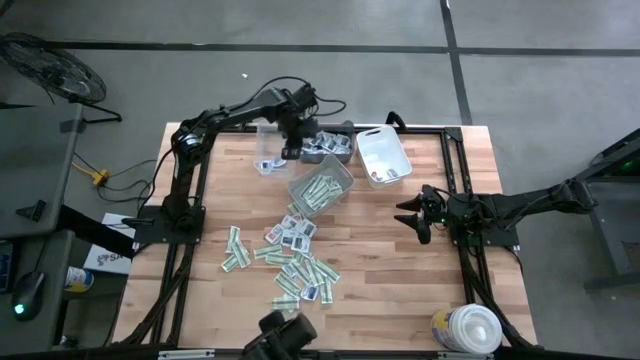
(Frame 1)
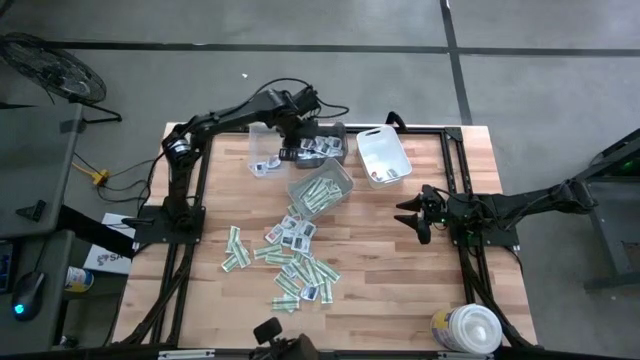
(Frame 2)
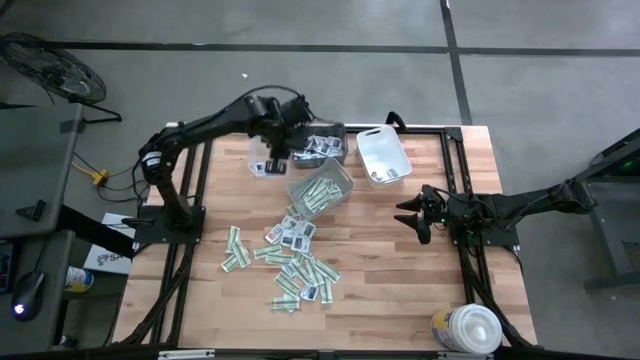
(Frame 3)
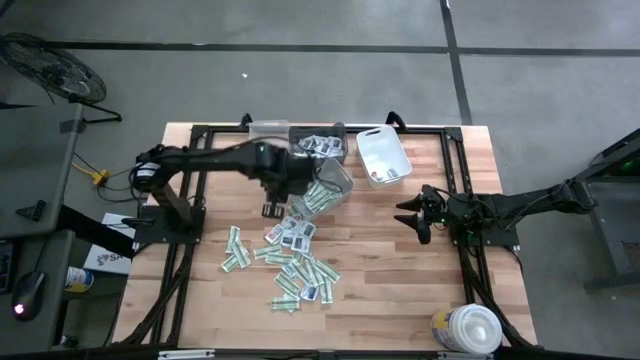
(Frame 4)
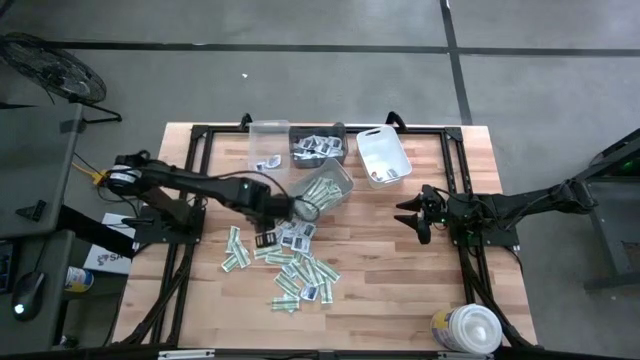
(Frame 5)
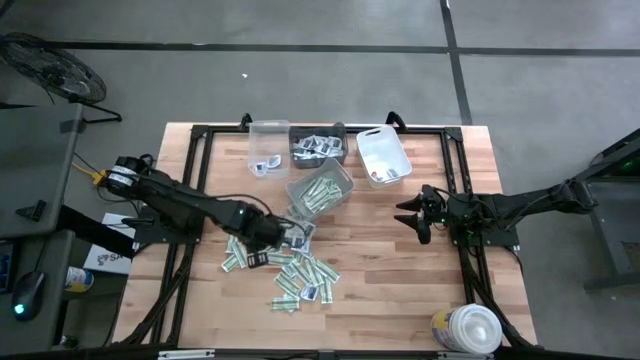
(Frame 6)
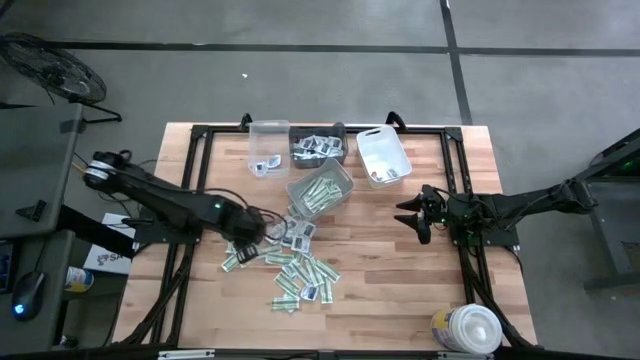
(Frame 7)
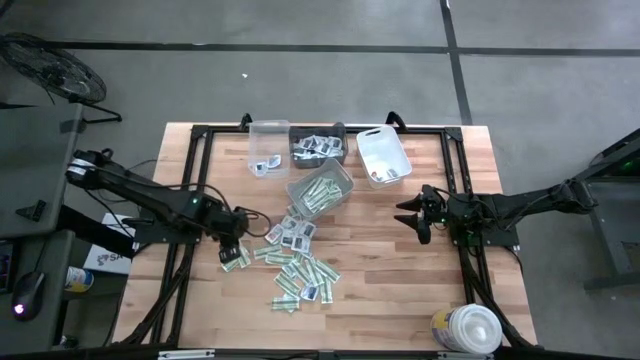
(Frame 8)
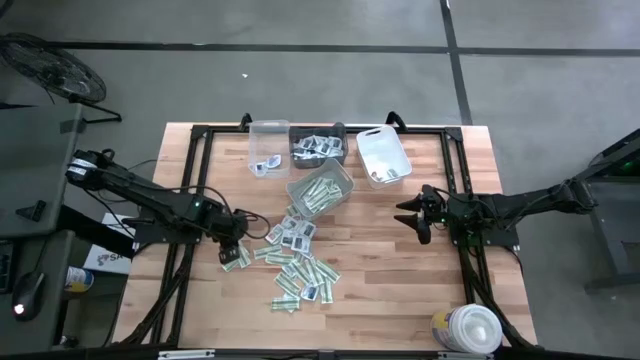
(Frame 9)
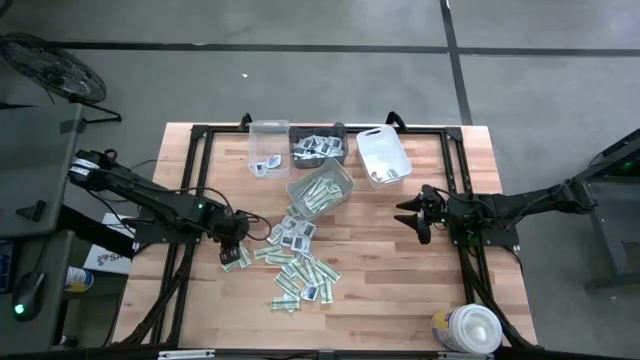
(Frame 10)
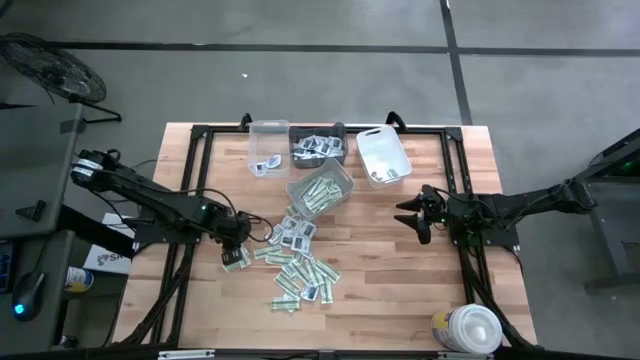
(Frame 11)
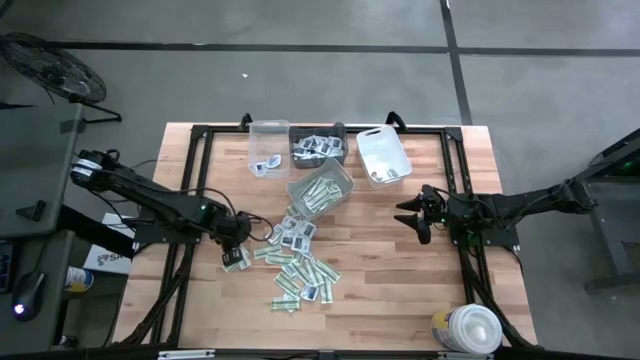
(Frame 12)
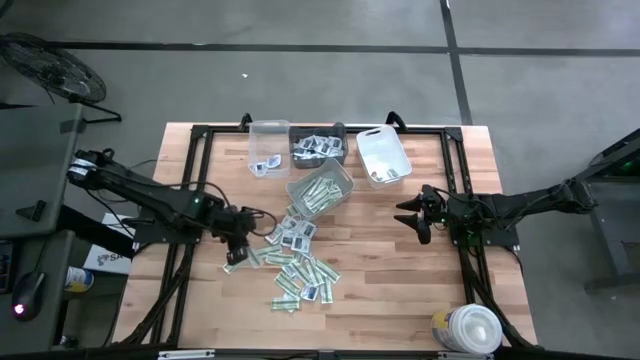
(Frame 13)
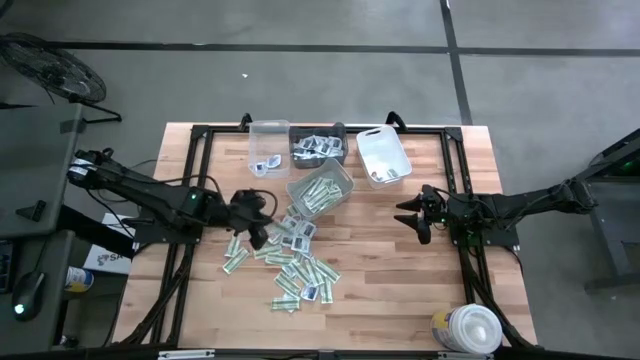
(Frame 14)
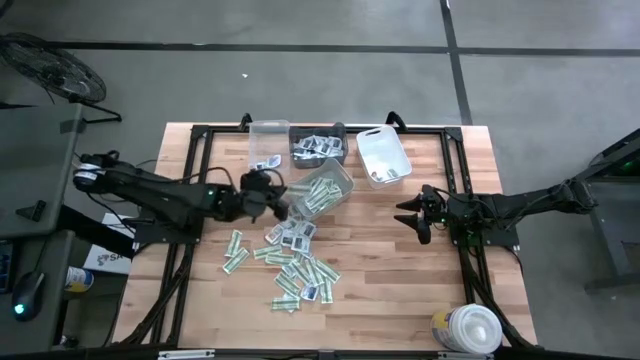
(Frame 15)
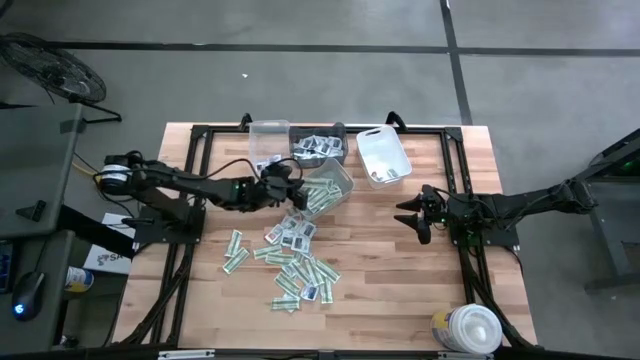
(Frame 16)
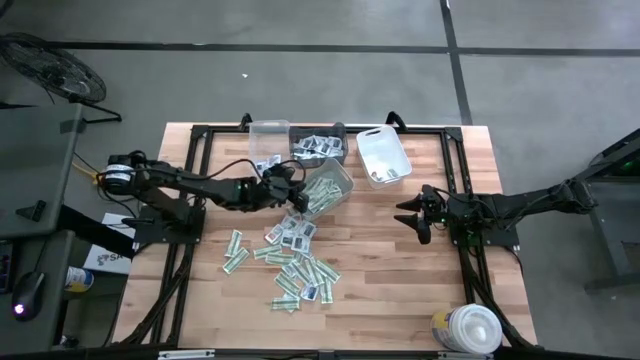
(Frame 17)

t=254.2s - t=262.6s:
Task: Pick & Place First Aid Supplies
Put the bandage pack into the gray bin

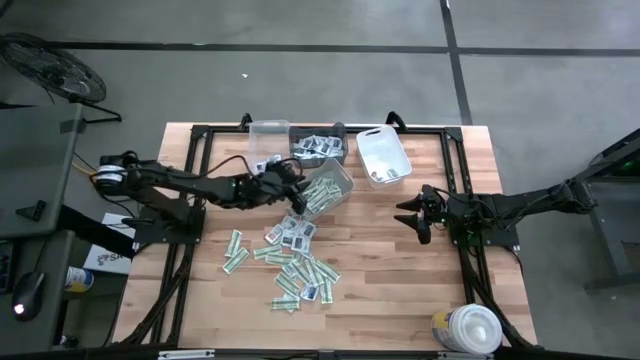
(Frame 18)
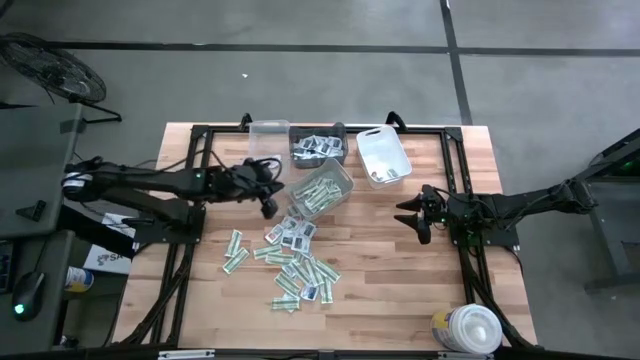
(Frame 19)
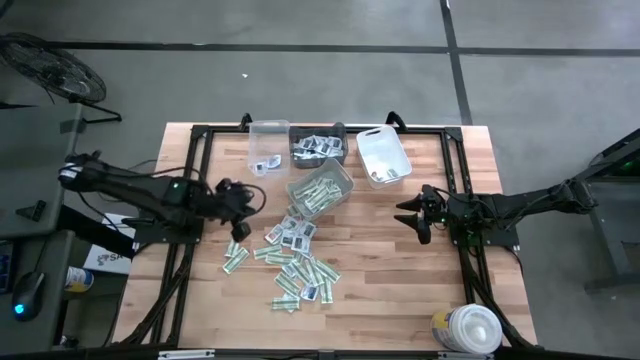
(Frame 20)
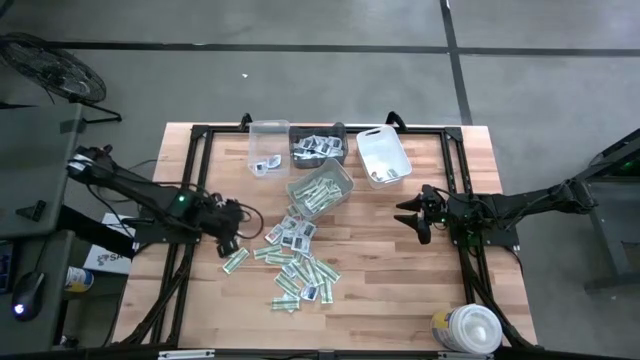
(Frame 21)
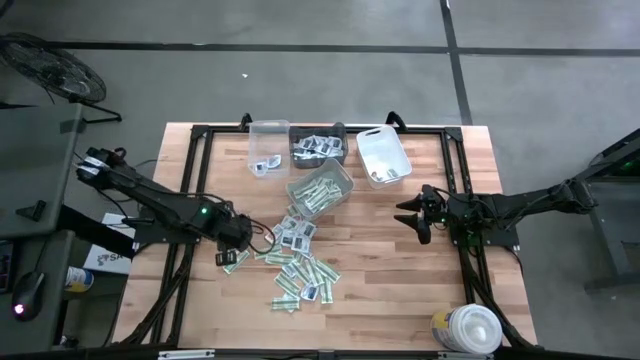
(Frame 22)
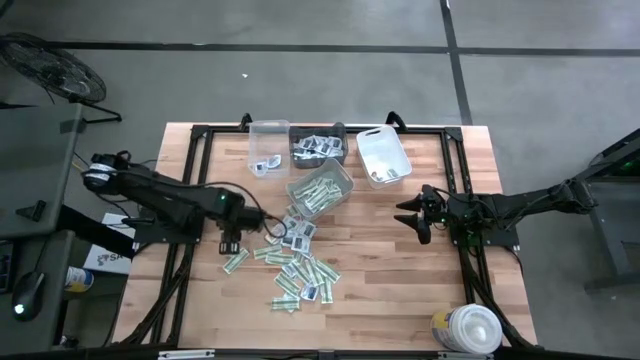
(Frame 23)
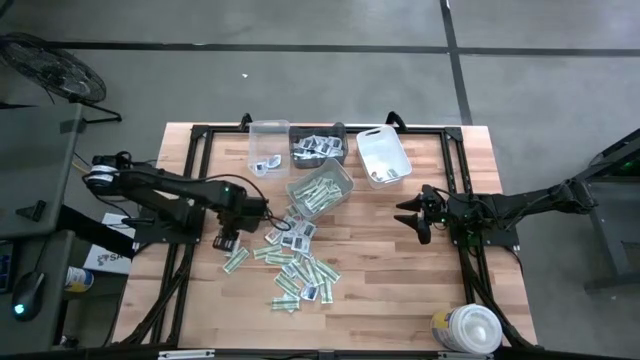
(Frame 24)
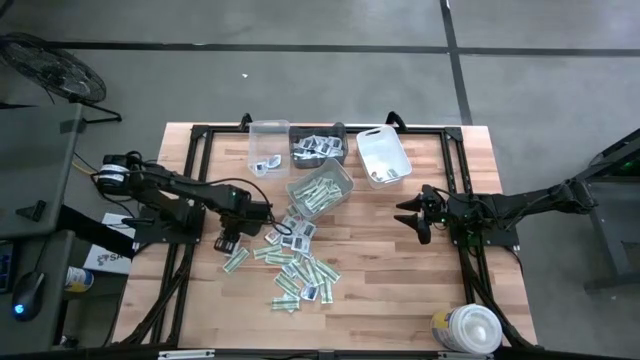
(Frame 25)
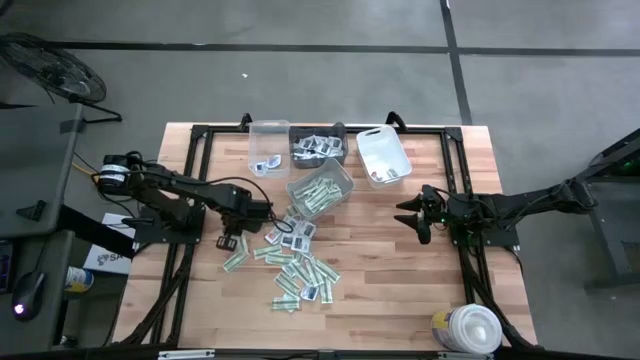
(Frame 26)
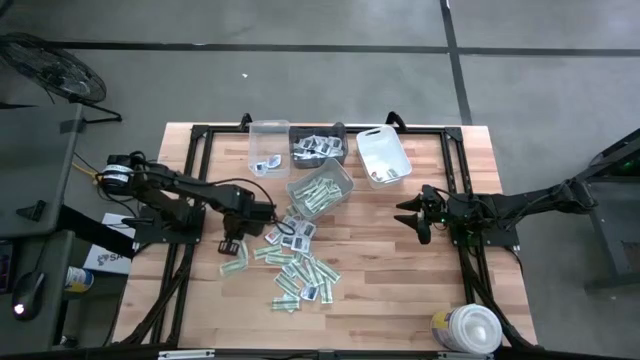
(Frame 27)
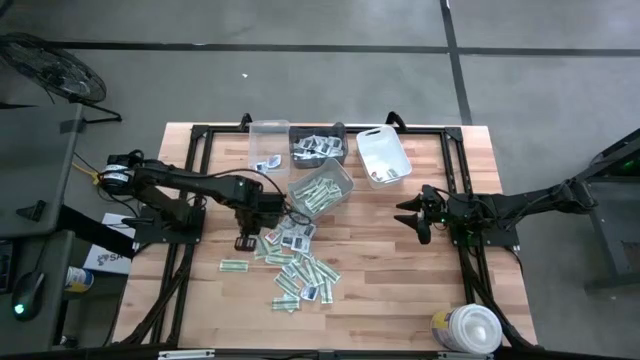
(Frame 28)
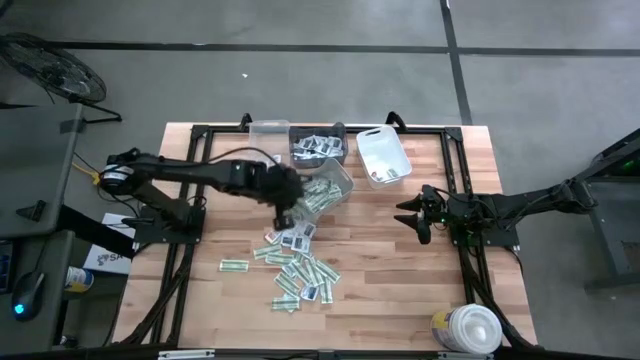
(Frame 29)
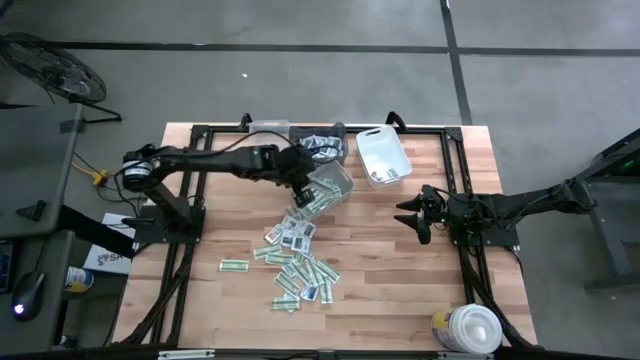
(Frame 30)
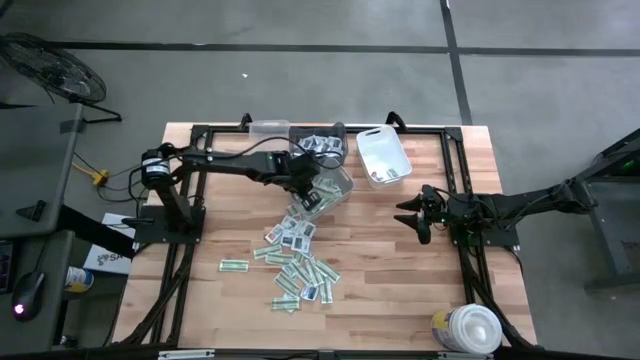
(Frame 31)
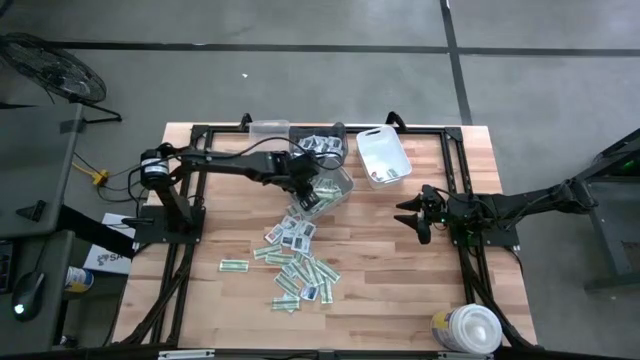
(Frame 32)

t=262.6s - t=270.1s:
Put the bandage pack into the gray bin

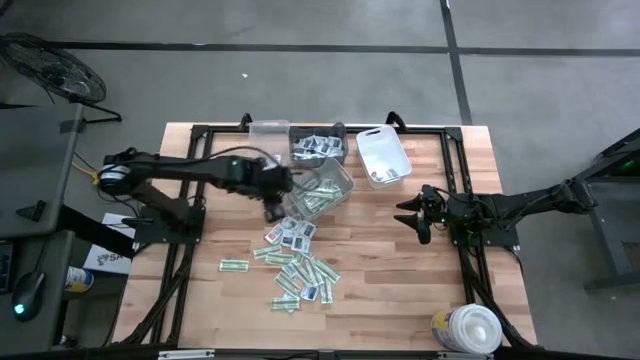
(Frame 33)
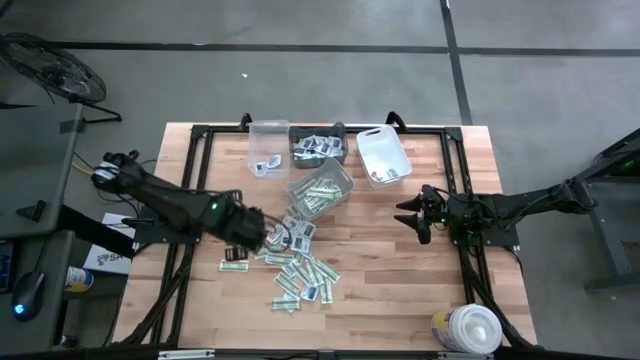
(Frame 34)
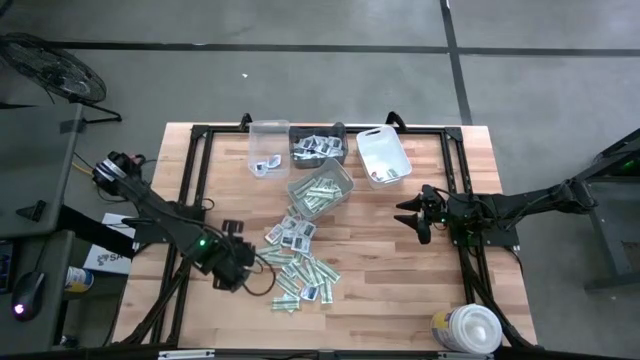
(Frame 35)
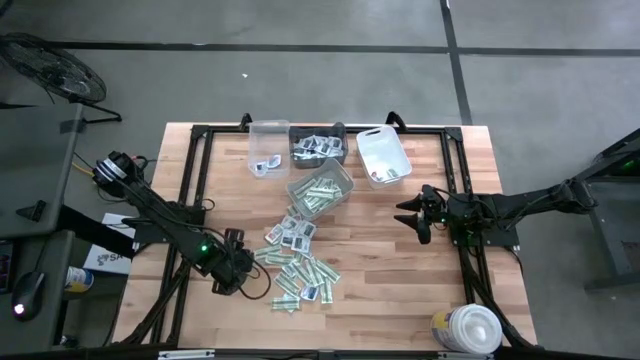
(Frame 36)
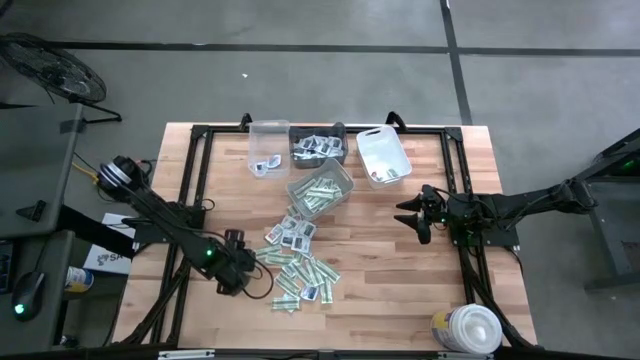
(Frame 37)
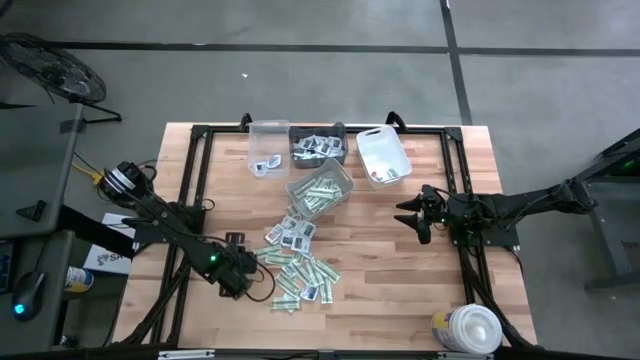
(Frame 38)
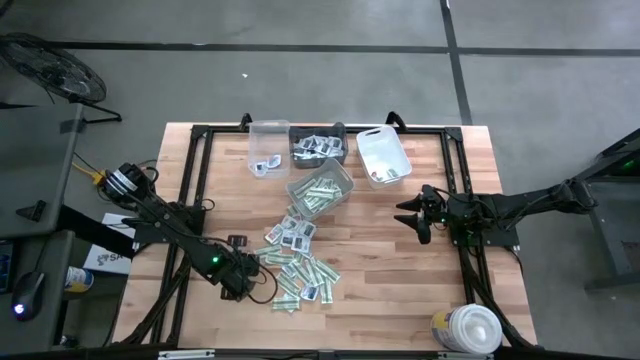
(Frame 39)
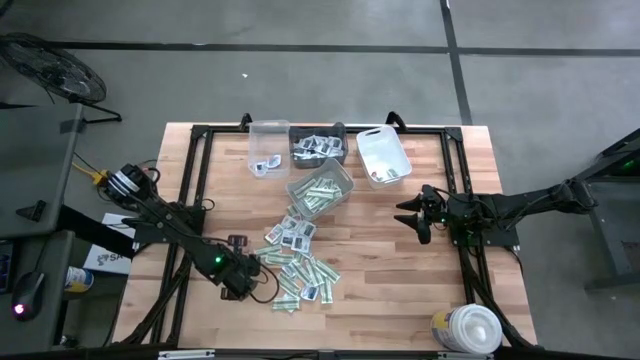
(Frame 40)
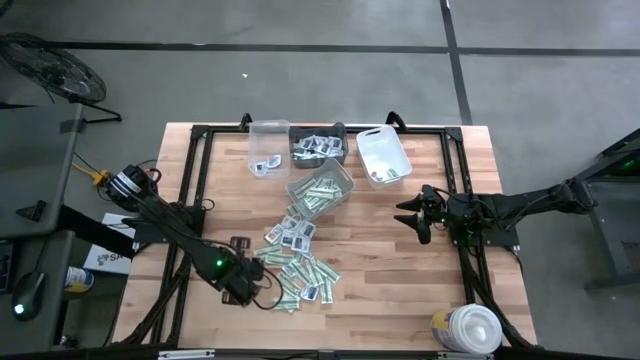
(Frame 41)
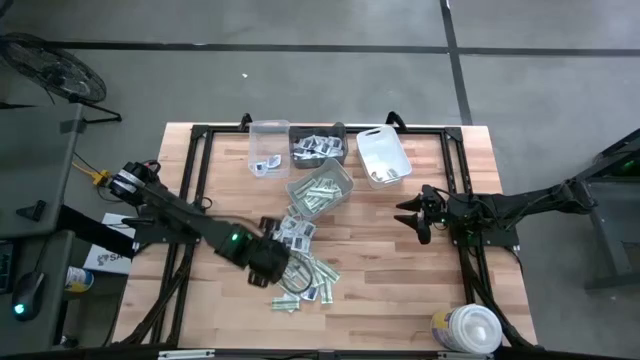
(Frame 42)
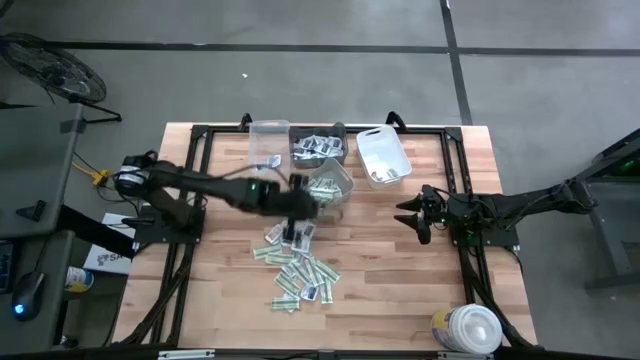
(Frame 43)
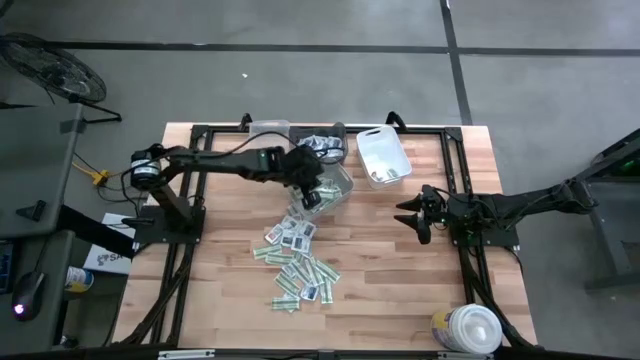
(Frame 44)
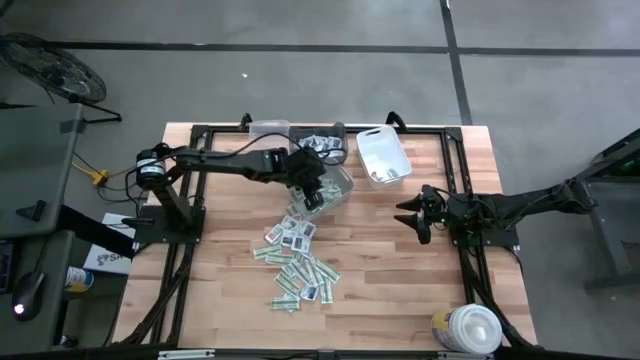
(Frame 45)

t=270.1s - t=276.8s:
Put the bandage pack into the gray bin
